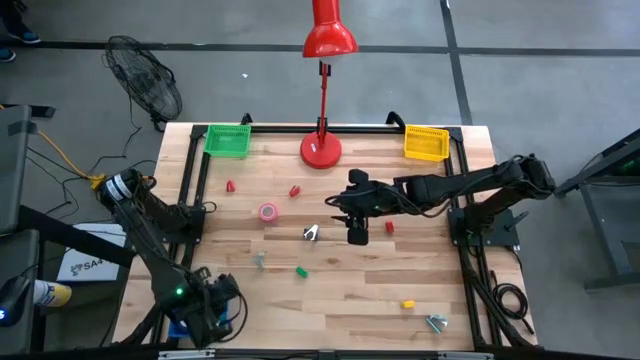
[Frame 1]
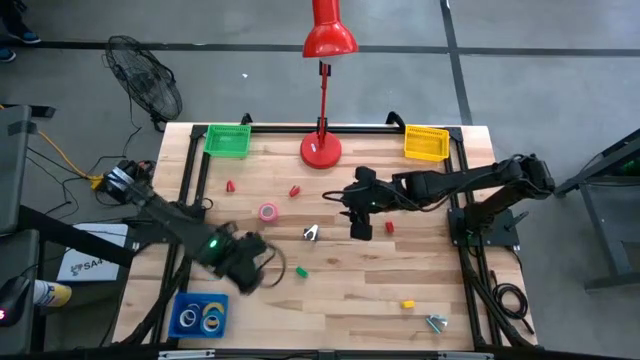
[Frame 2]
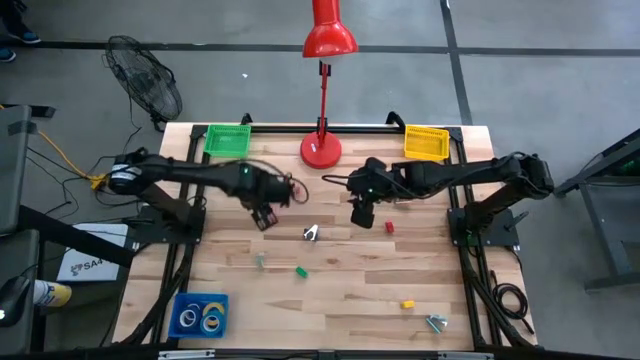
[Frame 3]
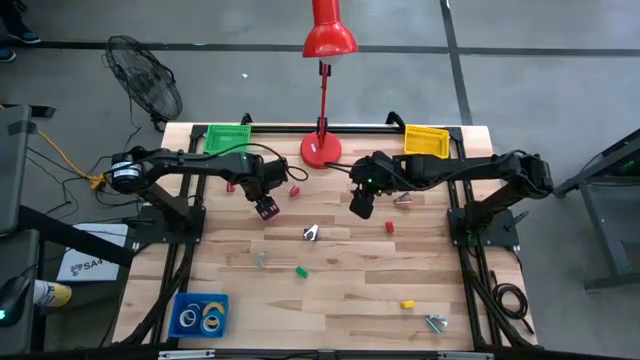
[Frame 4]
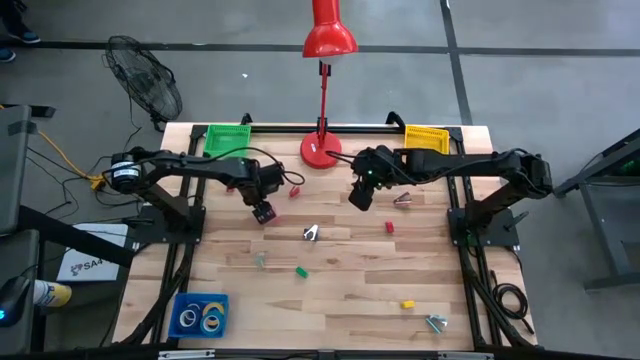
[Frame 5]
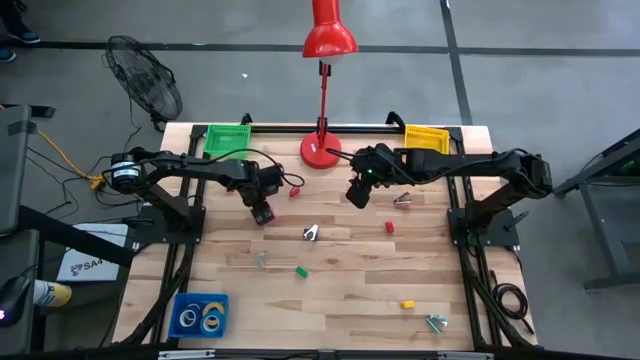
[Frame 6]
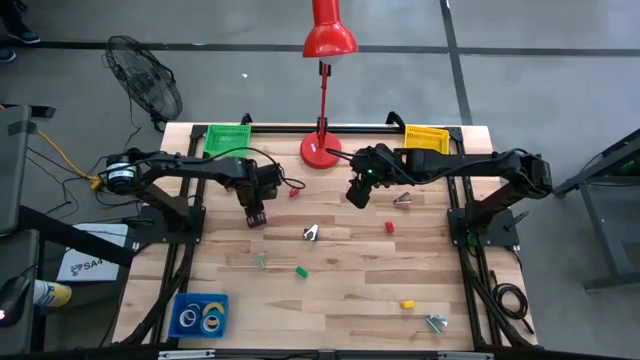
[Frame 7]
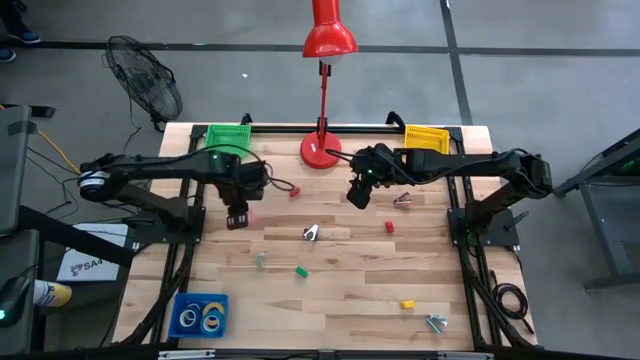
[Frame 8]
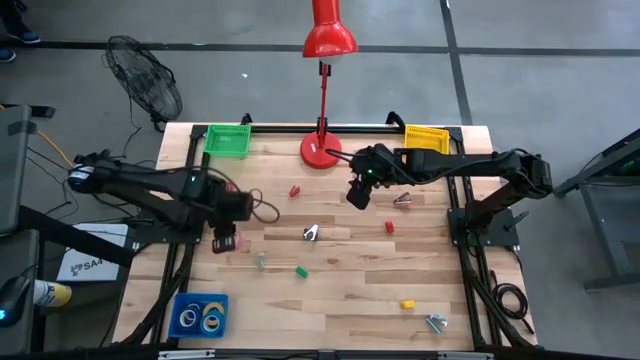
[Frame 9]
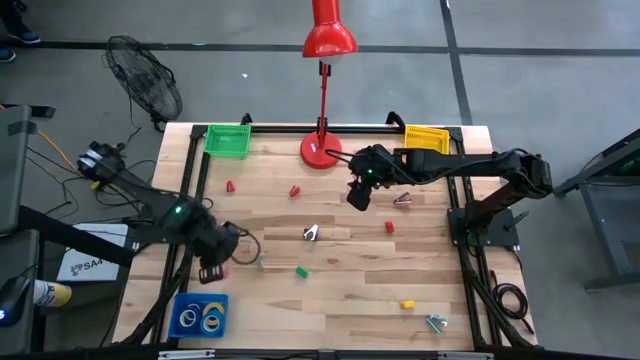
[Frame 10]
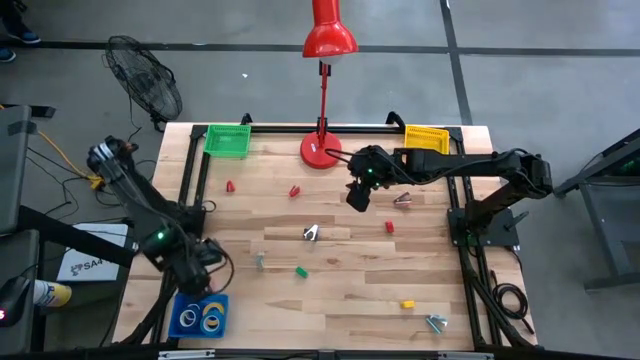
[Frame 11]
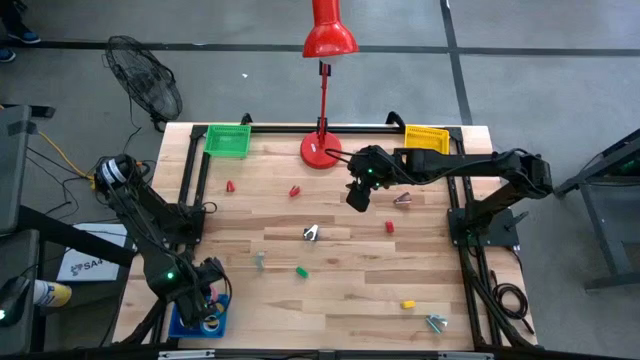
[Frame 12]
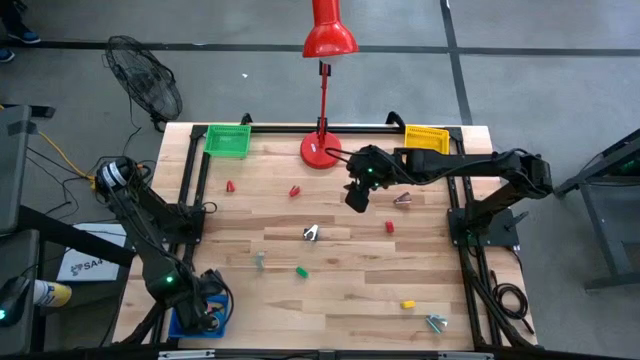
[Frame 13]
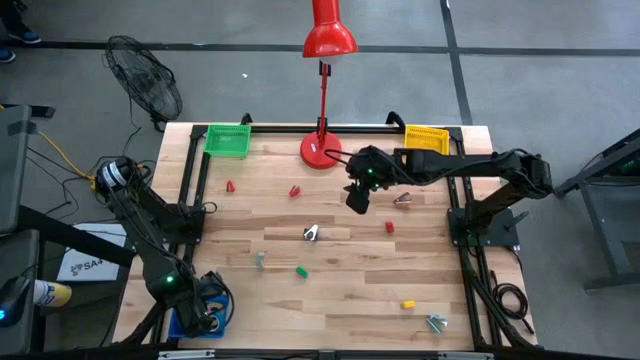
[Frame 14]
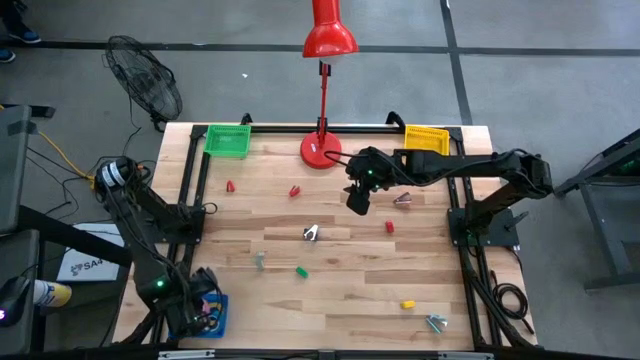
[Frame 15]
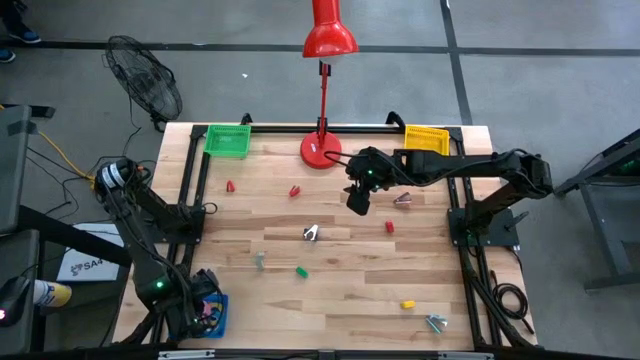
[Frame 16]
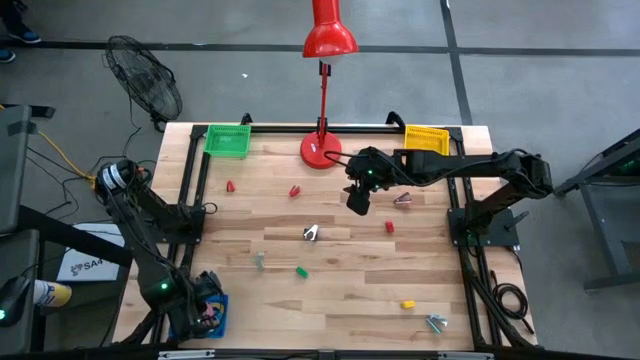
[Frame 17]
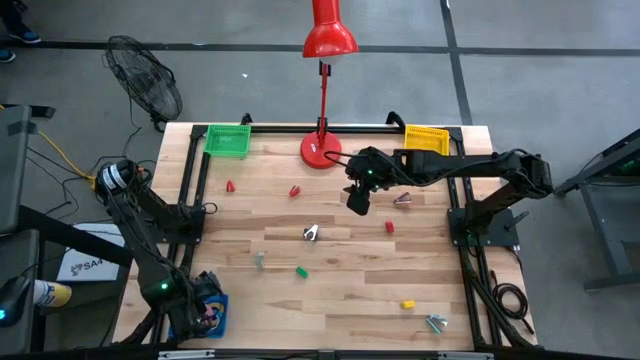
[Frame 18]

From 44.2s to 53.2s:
Task: Pick and place Stapler, Stapler remover, tape
Put the pink tape into the blue basket

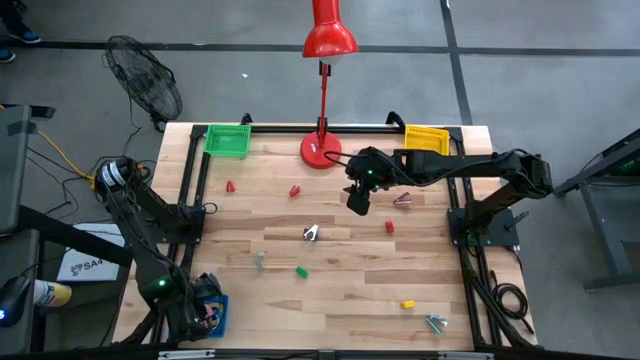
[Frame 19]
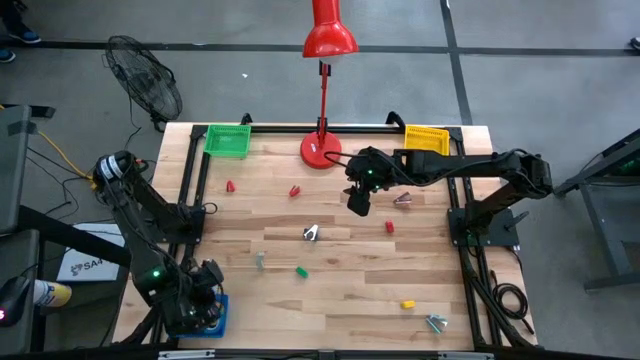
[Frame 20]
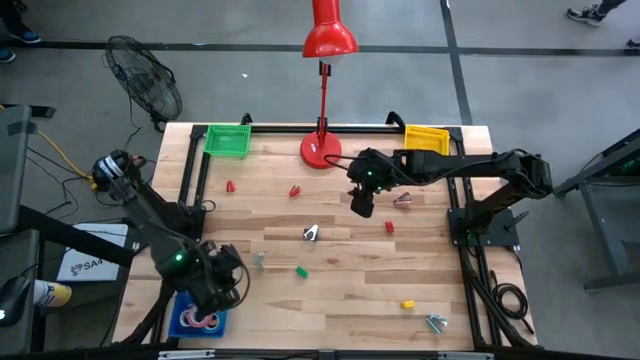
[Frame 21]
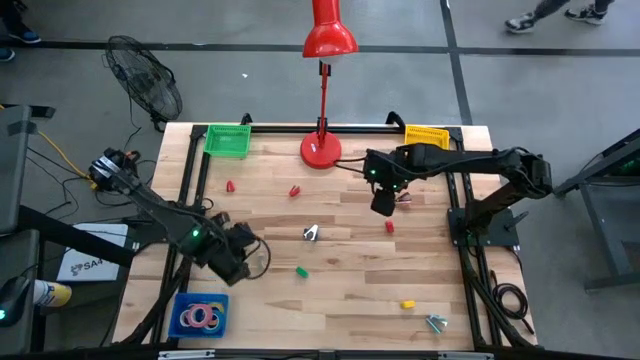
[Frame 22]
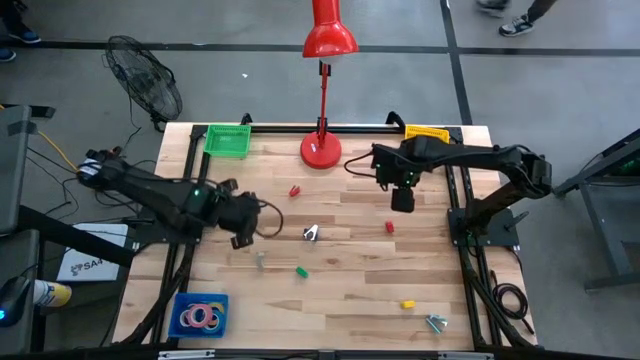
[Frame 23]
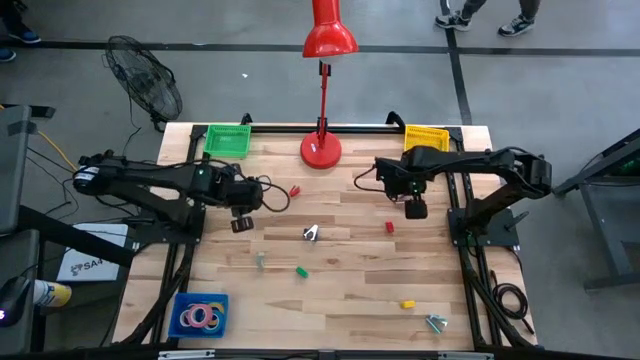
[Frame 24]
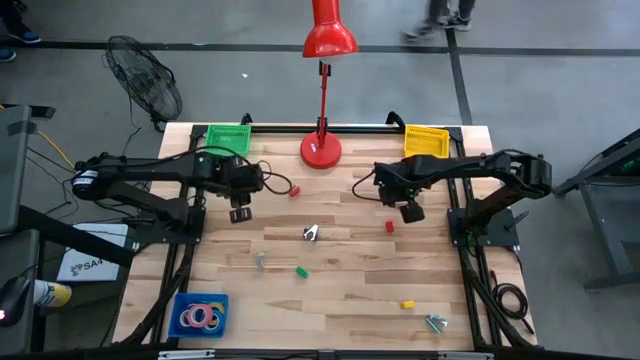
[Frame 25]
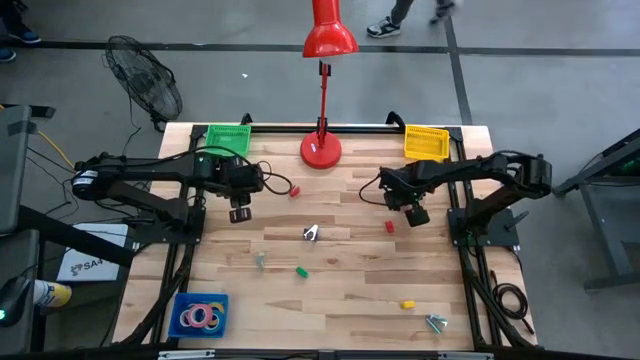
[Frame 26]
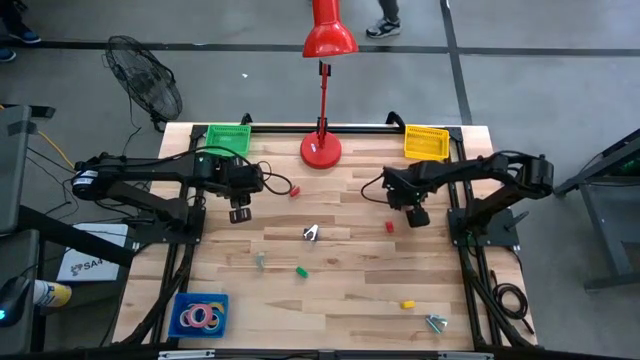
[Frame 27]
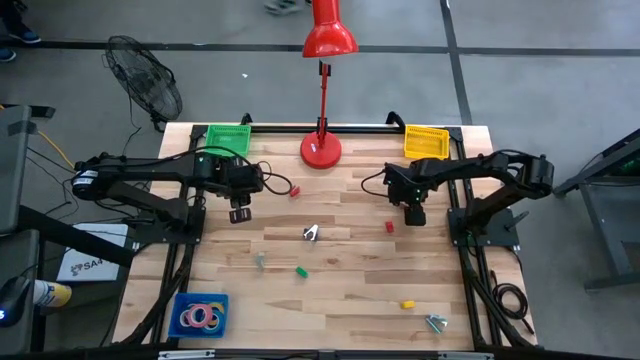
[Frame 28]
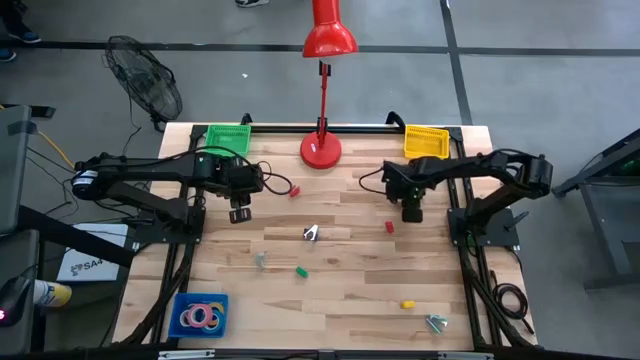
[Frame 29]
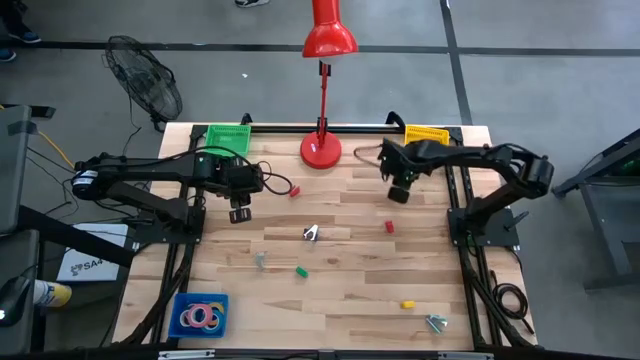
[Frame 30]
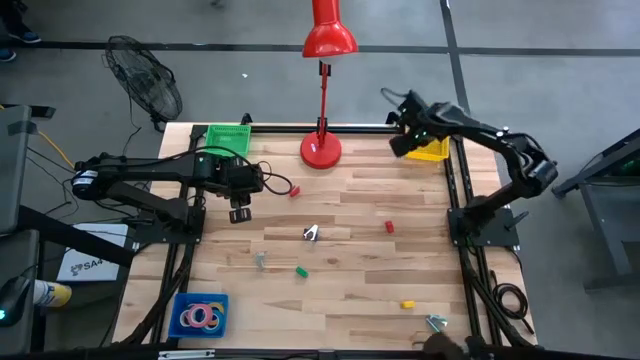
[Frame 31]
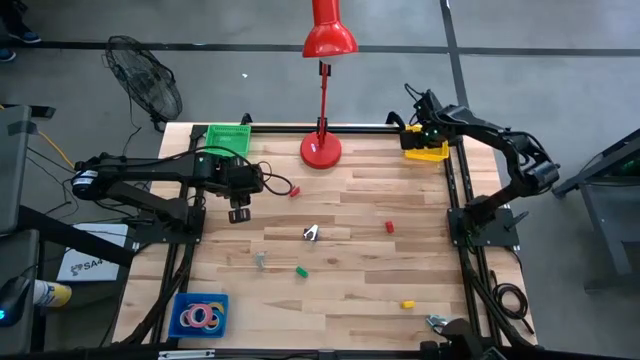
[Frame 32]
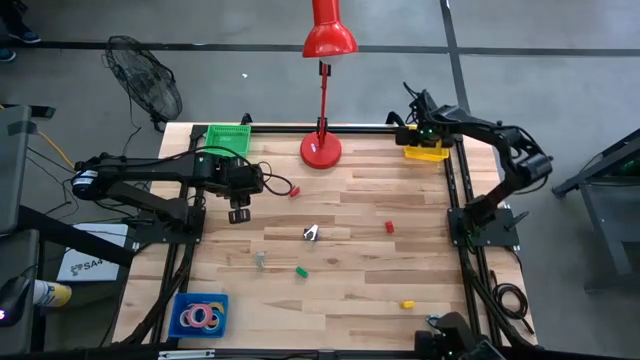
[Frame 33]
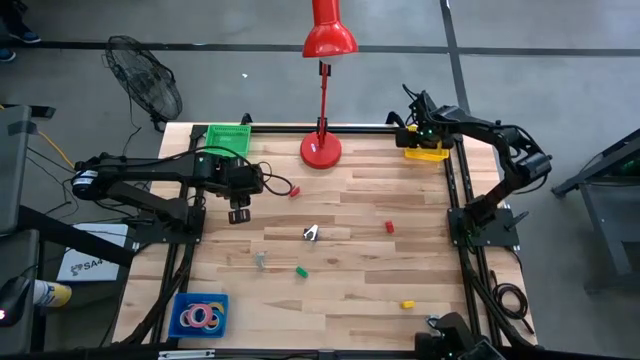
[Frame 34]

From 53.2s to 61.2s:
Put the pink staple remover into the yellow basket

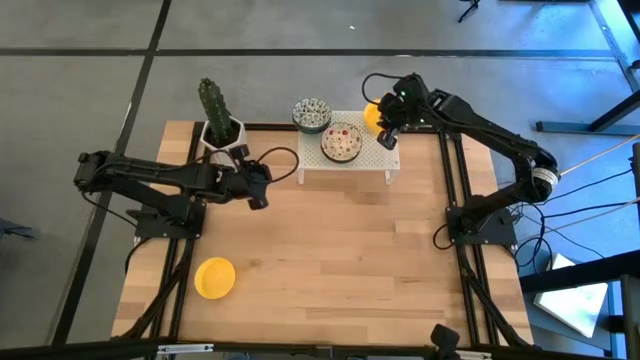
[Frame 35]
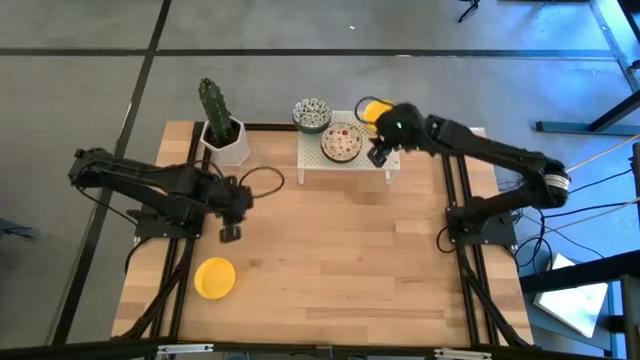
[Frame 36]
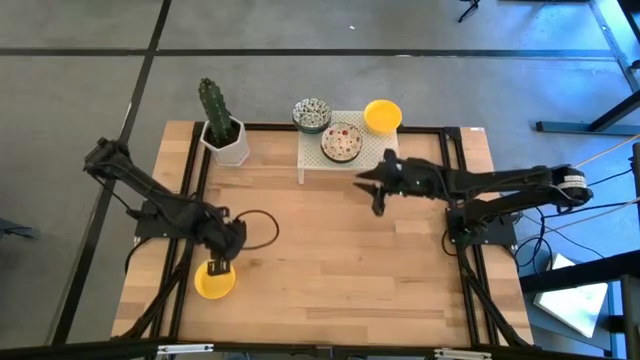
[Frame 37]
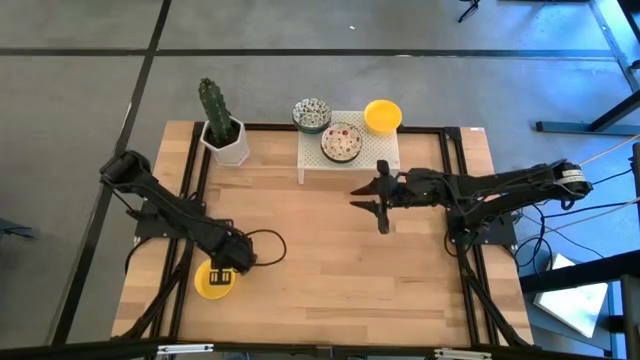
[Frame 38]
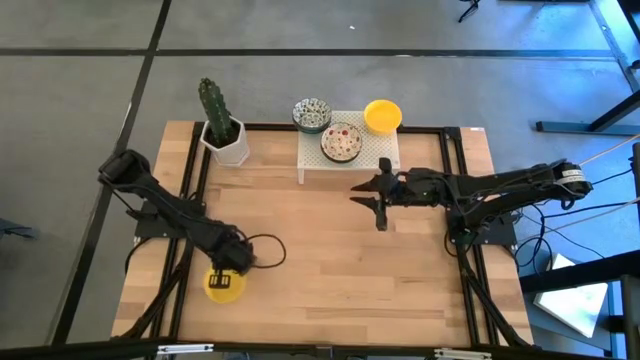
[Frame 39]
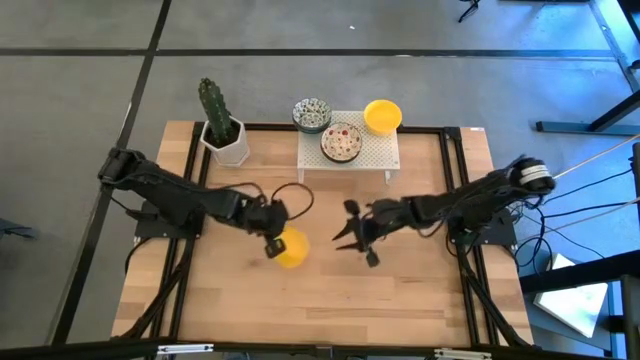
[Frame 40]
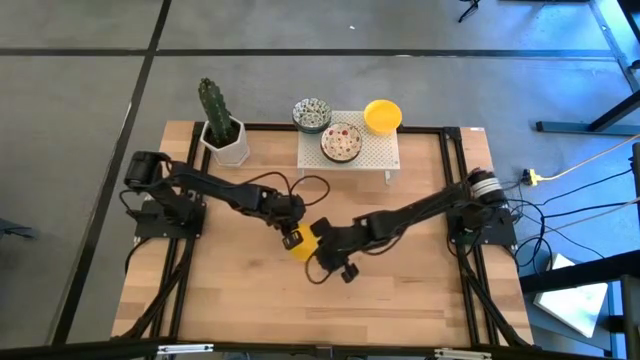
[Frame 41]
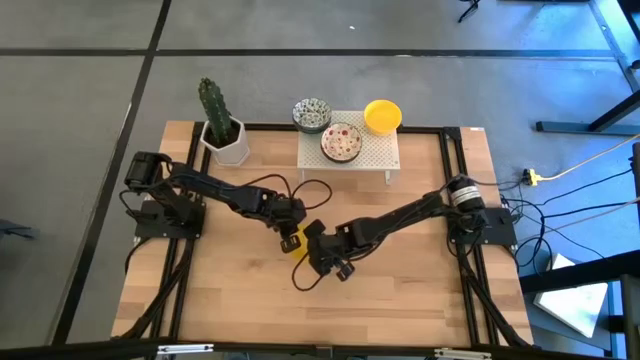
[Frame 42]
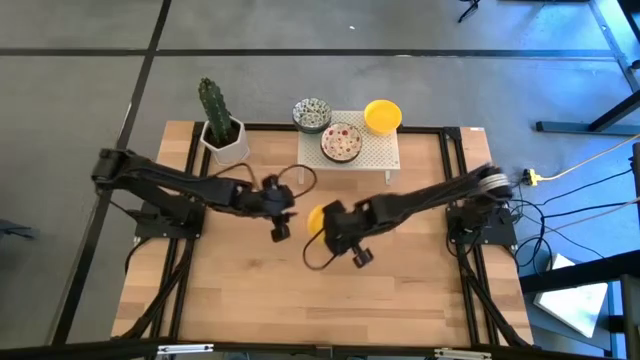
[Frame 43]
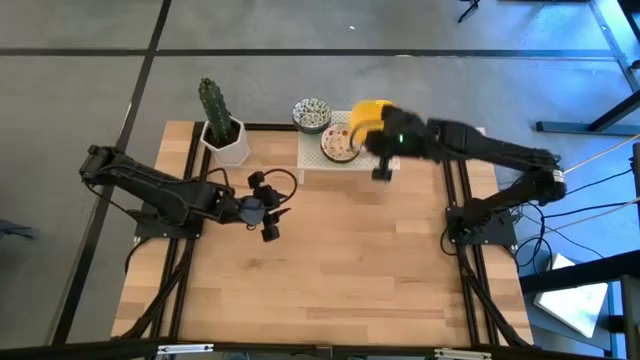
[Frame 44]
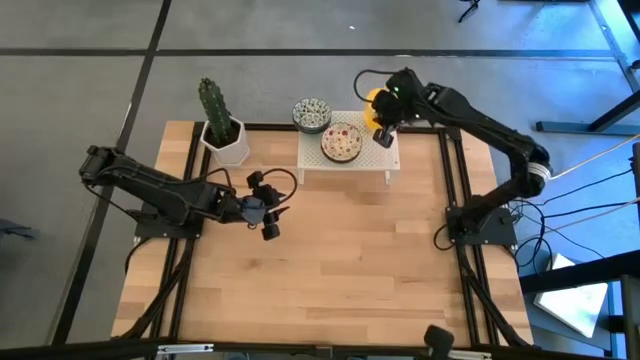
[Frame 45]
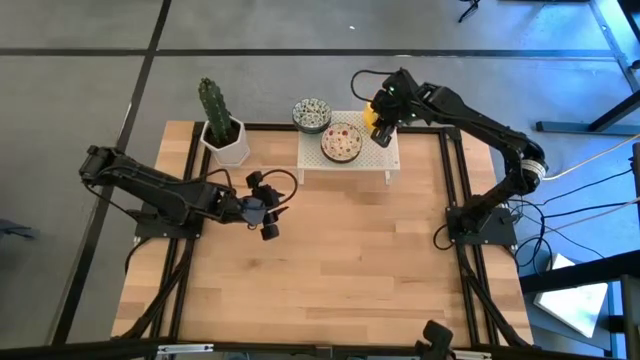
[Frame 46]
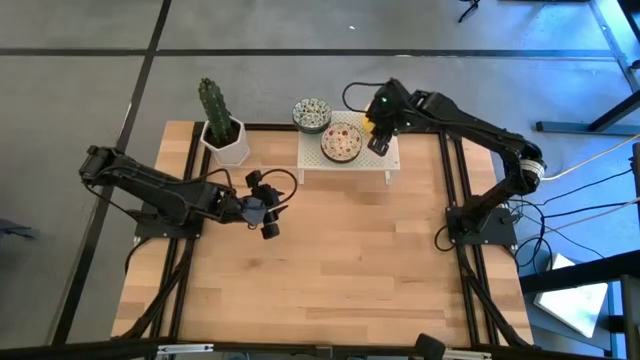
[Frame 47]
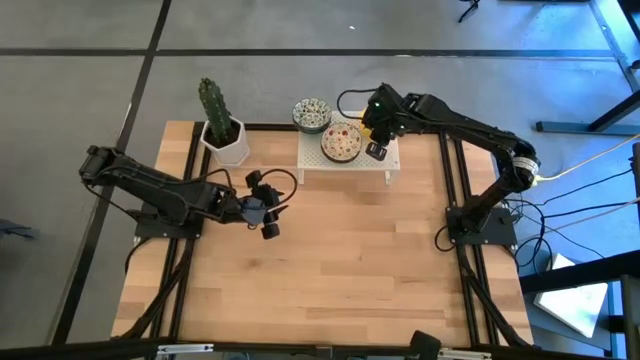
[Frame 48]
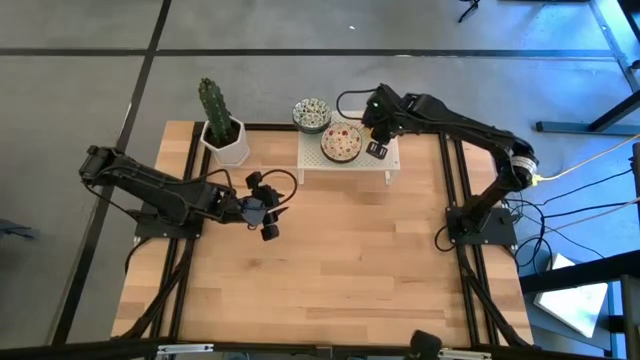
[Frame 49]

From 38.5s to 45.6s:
Task: Pick & Place Mini bowls
Stack the yellow bowl on top of the yellow bowl on the shelf
